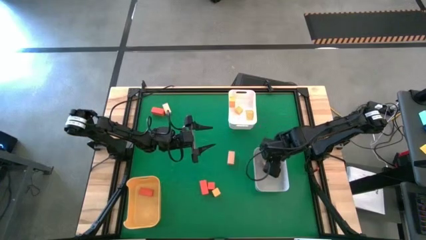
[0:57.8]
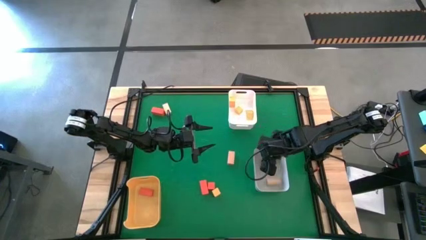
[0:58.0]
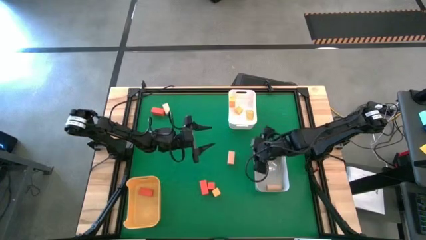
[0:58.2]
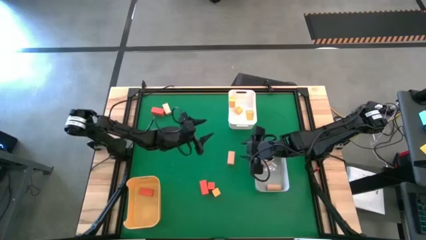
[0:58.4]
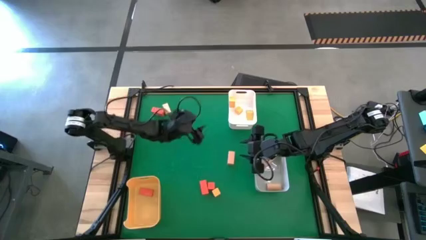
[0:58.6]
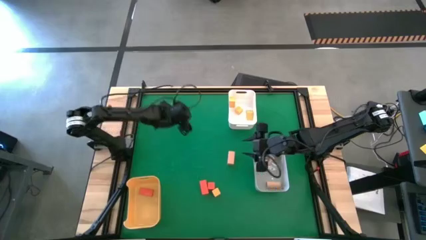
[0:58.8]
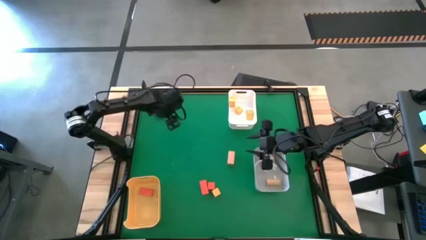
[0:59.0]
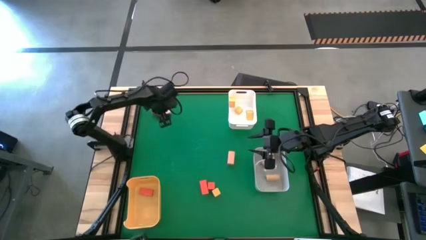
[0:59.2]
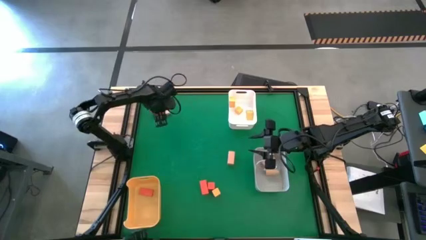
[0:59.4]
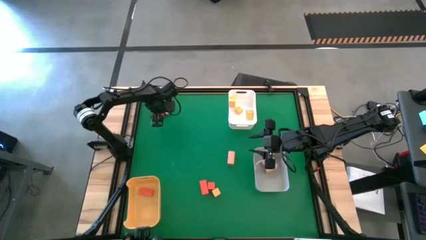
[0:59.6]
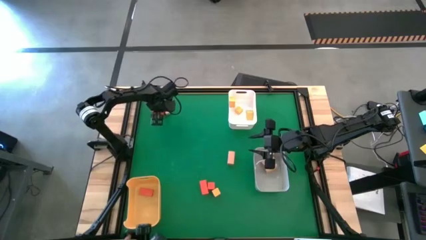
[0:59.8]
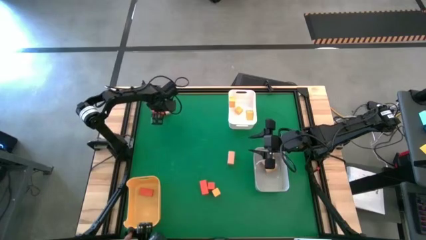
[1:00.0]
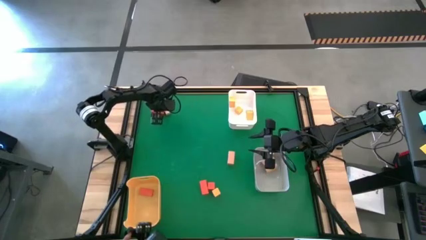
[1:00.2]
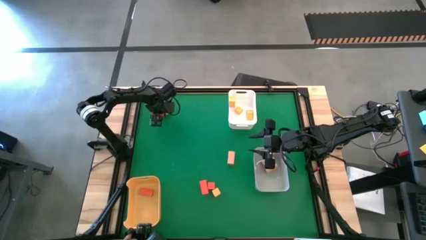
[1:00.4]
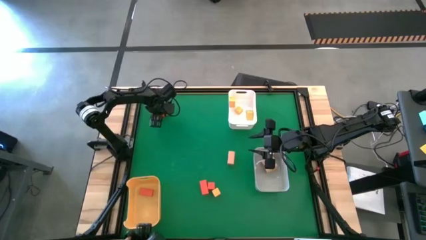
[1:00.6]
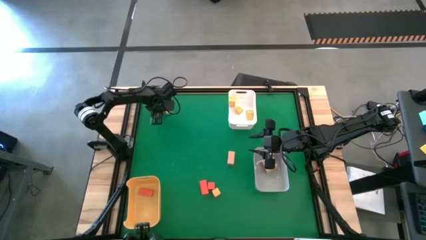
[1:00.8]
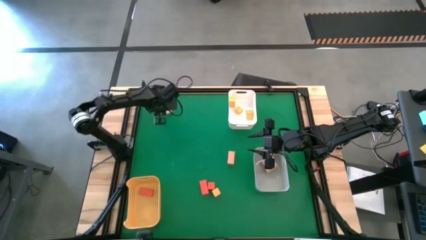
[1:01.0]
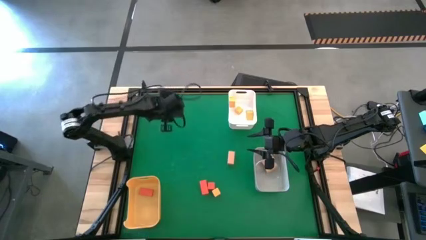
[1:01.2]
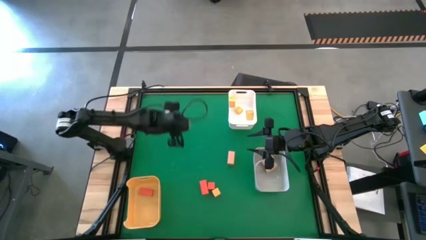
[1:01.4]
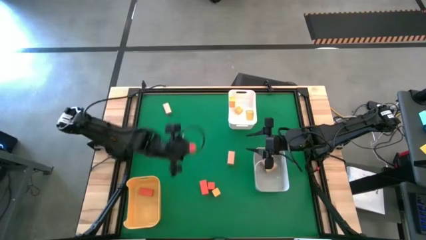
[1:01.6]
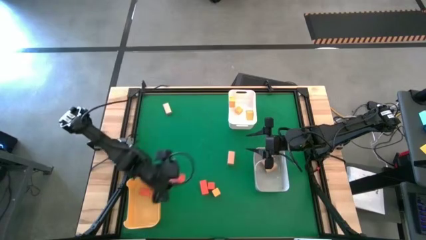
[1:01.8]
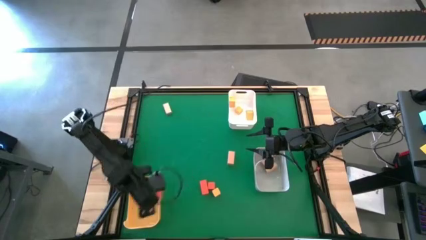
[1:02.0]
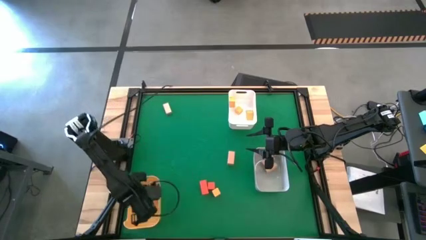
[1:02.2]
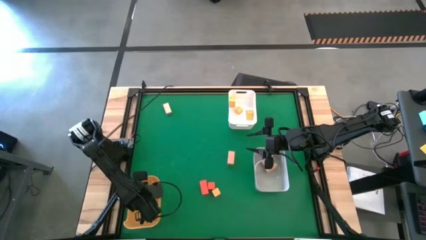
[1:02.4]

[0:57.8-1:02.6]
Task: Sort & place blocks by color
Put the orange block into the yellow bin

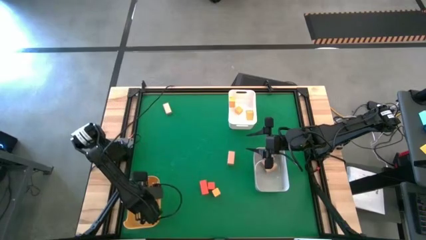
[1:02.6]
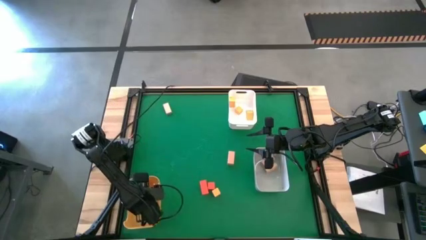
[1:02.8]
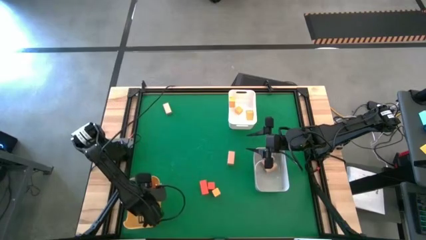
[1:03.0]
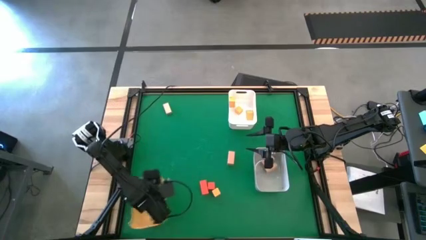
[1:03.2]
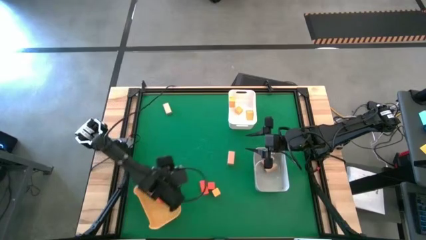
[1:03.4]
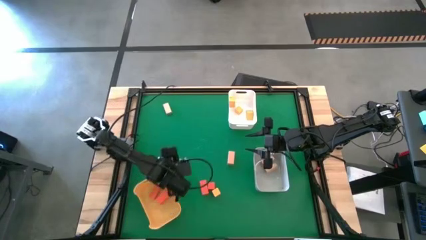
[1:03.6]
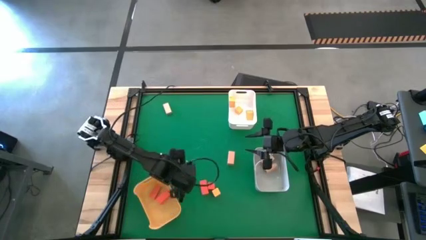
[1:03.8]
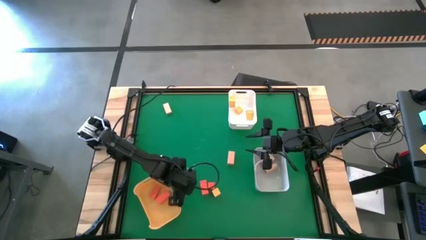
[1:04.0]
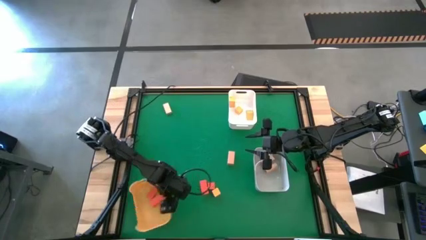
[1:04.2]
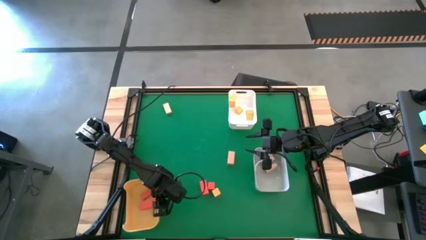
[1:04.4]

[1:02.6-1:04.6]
Adjust the yellow bin on the table

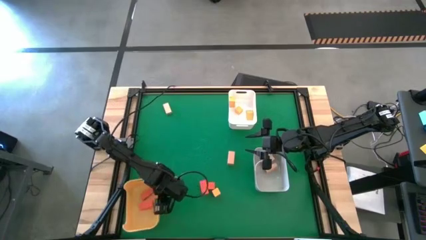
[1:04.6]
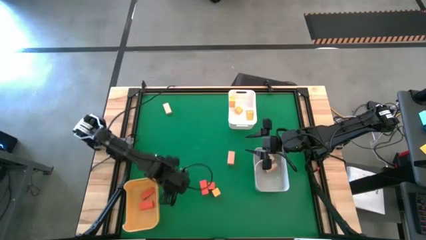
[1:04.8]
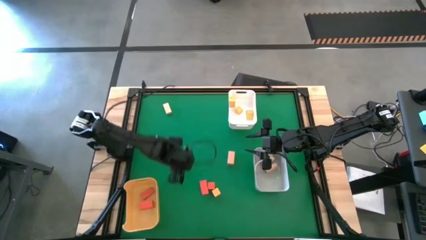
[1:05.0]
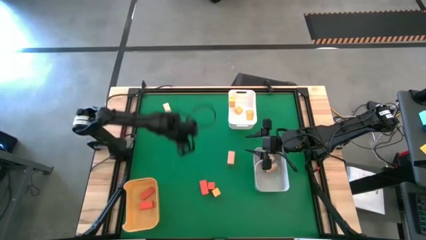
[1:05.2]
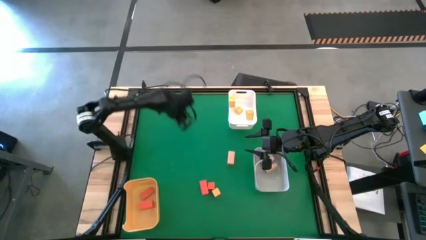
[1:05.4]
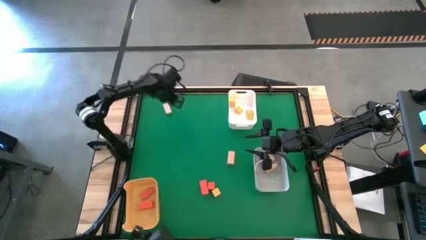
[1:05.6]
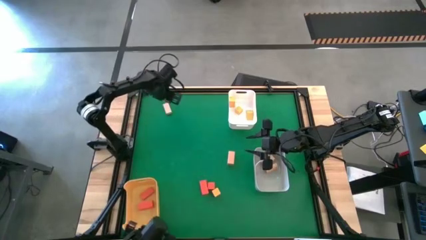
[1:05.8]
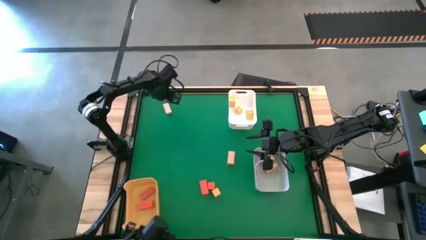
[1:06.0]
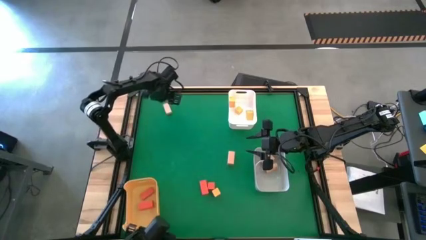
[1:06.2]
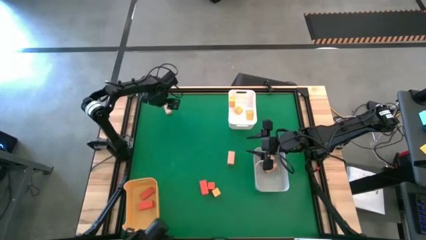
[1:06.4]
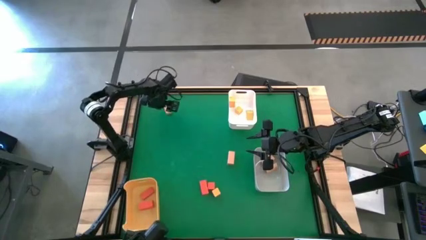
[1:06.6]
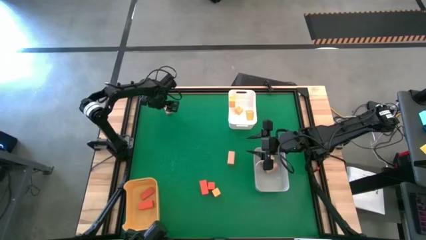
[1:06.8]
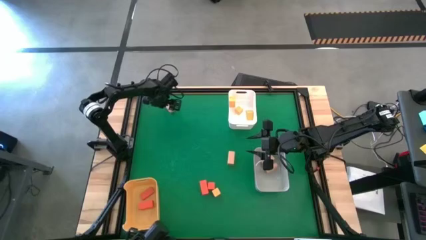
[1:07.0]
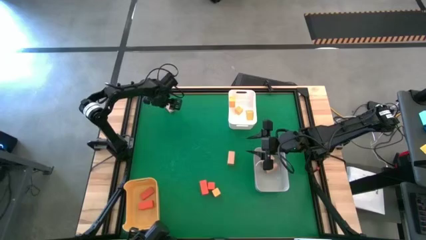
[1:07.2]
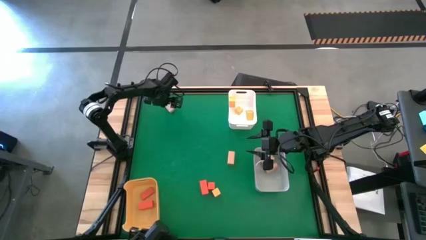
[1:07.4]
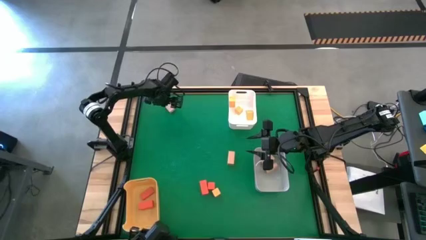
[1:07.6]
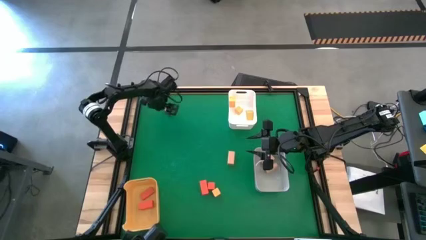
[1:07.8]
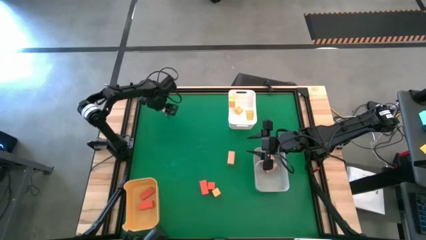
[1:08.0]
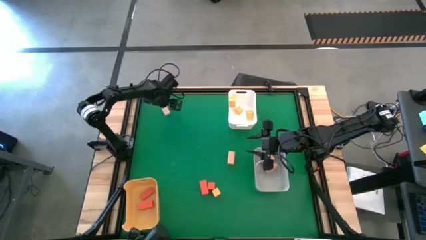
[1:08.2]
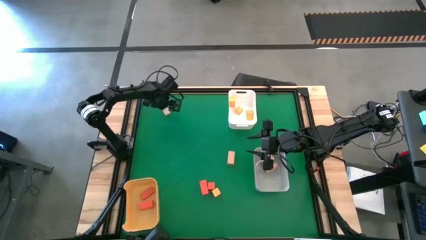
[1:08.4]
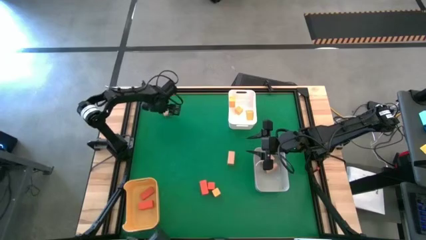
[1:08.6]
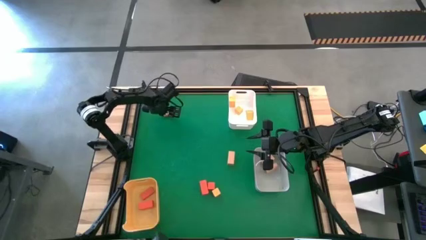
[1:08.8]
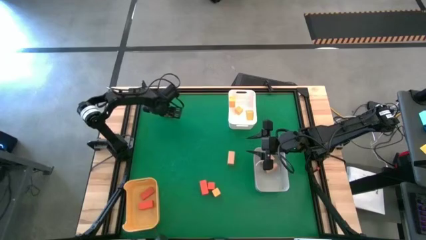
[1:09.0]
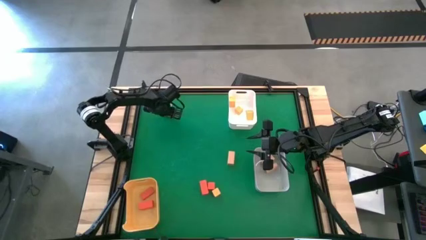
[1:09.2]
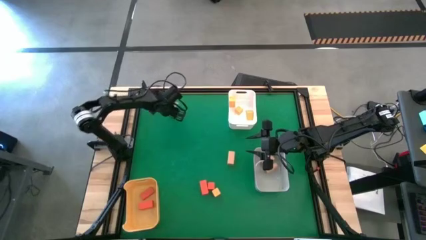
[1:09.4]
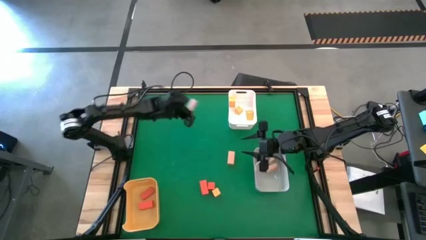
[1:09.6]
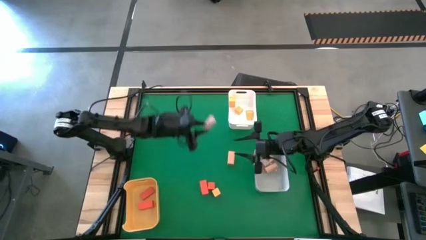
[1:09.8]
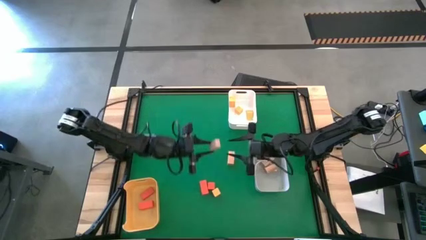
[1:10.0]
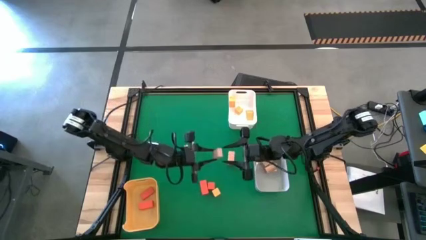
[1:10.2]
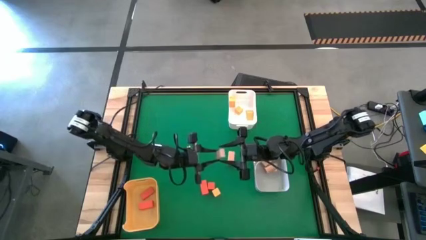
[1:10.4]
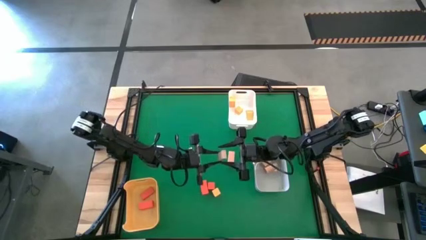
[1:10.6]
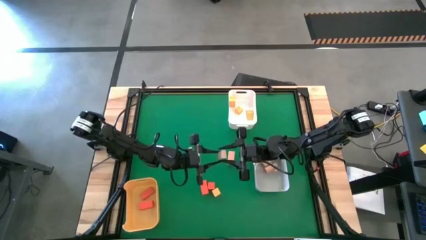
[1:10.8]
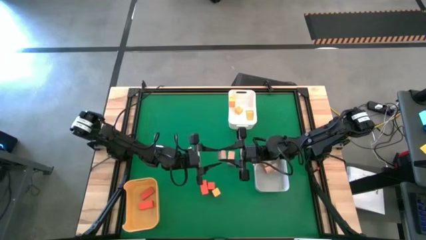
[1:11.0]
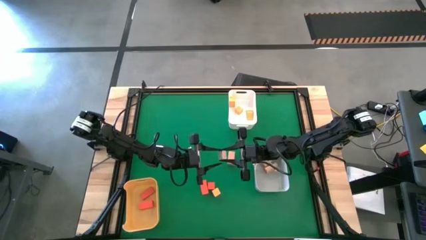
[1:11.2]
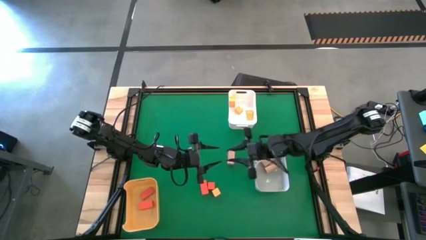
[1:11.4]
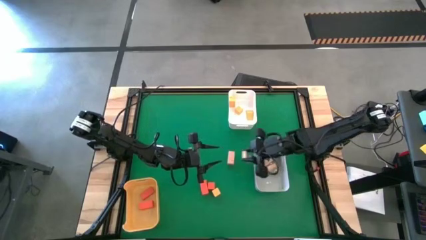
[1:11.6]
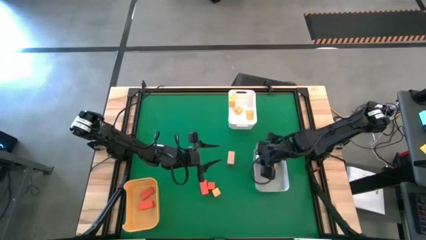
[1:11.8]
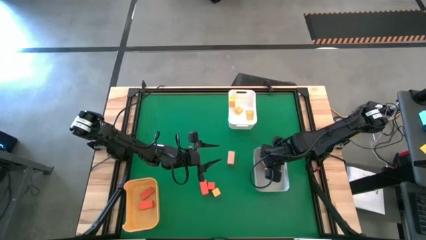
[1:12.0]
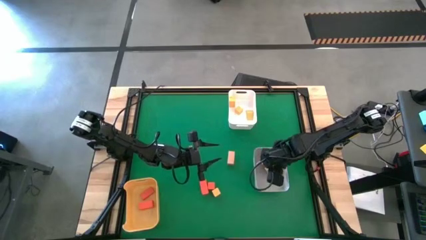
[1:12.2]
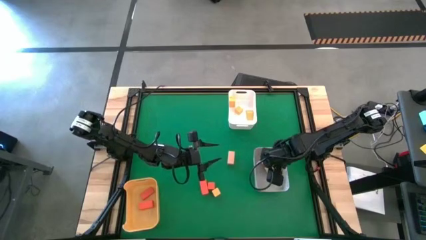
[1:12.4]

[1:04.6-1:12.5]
Put the brown block into the gray bin

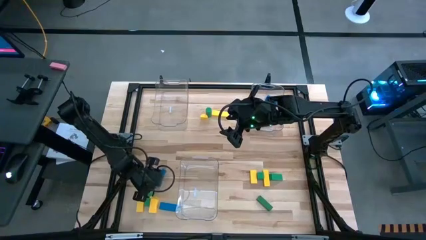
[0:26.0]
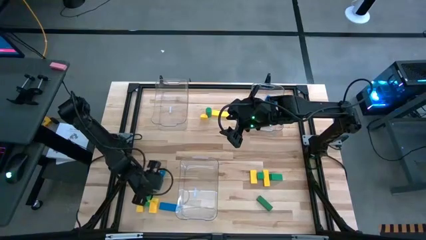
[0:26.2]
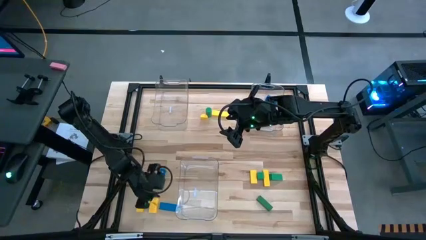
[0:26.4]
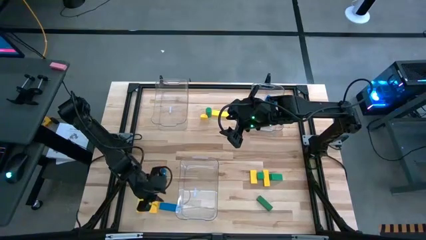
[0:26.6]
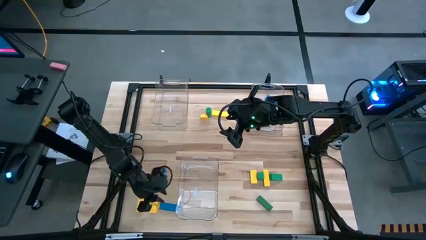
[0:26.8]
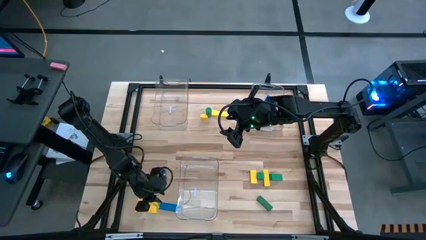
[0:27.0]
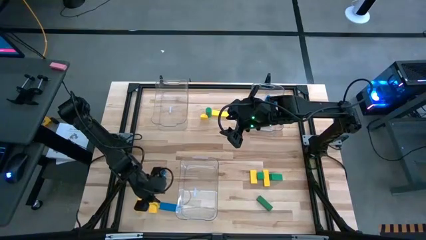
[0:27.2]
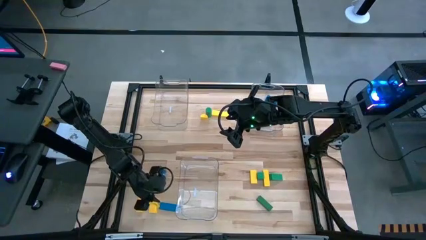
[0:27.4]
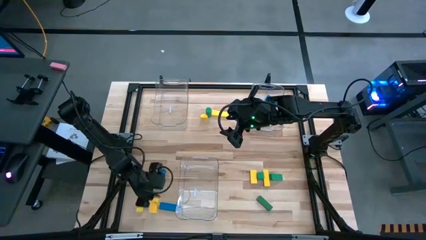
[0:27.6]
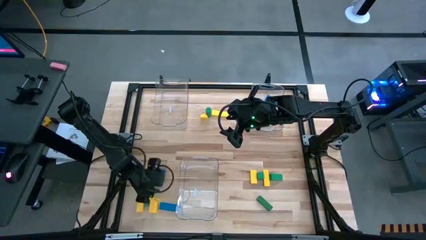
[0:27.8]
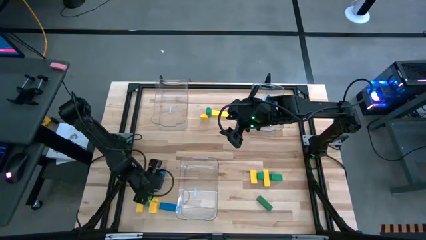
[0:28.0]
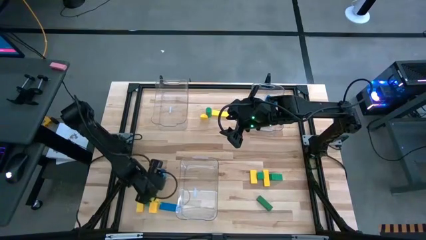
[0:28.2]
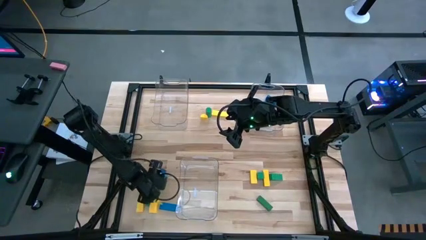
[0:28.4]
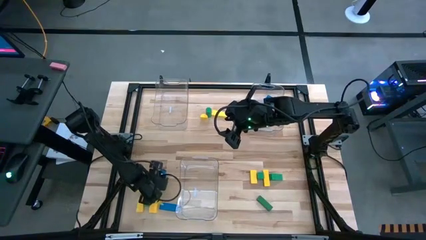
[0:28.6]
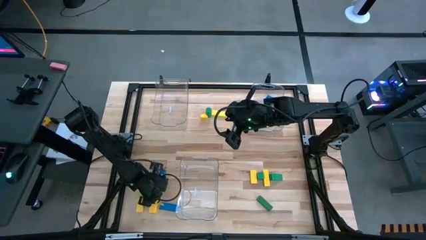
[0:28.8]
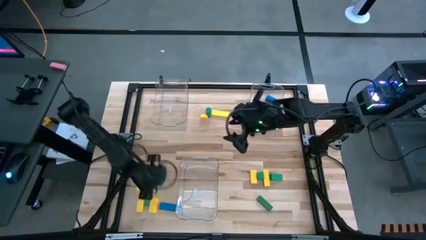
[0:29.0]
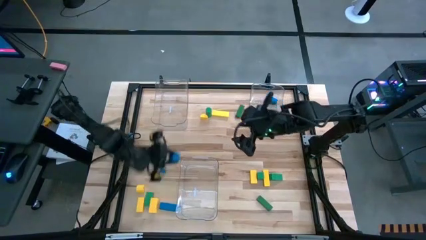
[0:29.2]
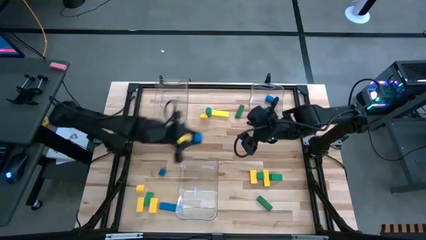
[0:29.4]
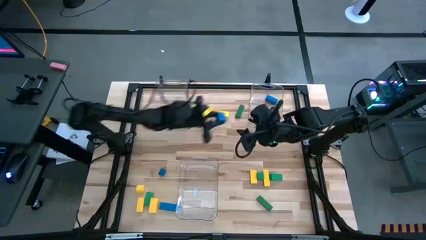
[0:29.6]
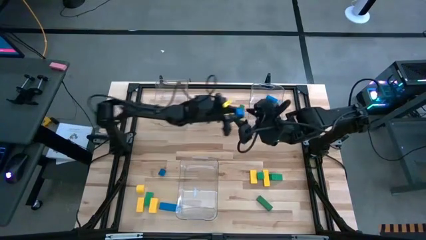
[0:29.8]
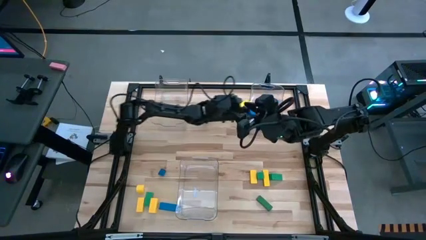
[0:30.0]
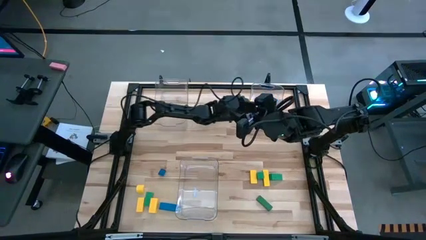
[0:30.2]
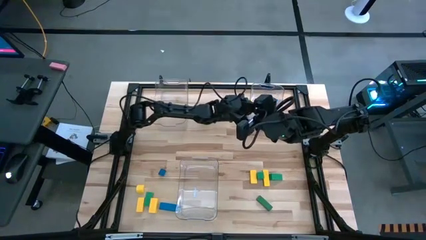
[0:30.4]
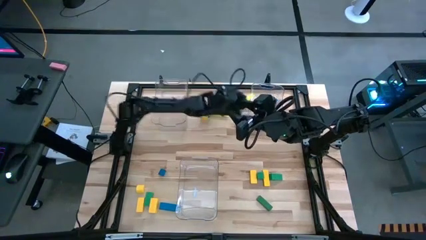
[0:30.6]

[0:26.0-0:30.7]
Task: Sort blocks
Put the blue block into the top right transparent bin
